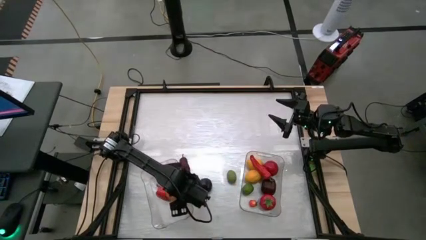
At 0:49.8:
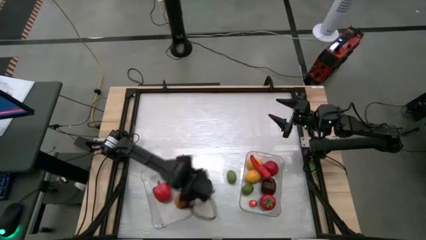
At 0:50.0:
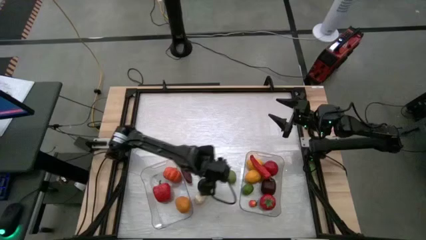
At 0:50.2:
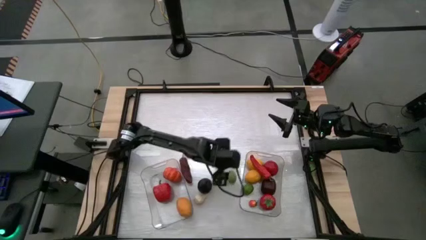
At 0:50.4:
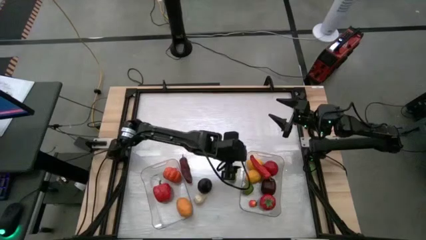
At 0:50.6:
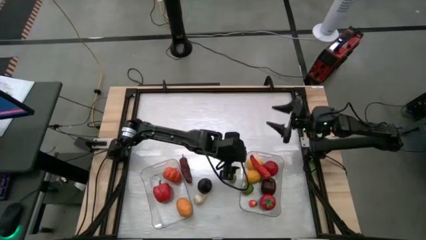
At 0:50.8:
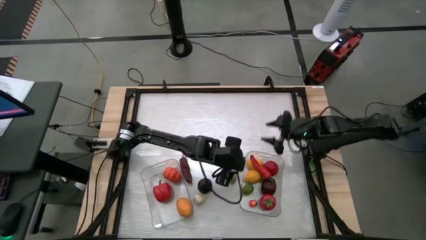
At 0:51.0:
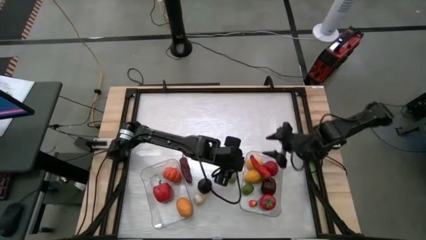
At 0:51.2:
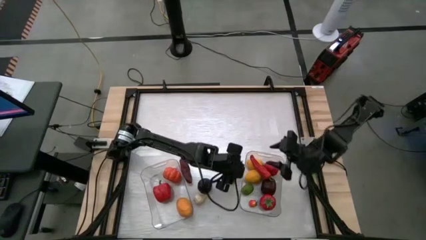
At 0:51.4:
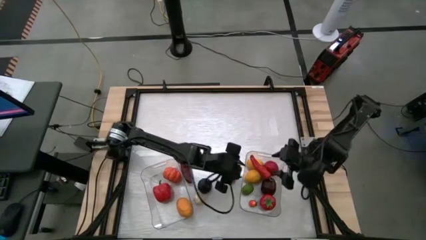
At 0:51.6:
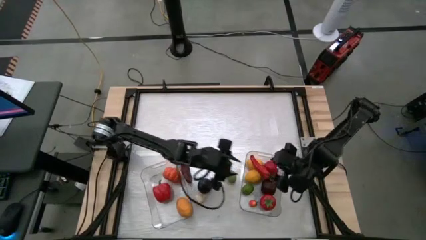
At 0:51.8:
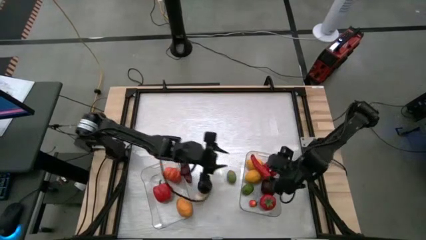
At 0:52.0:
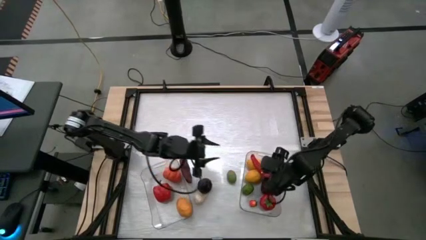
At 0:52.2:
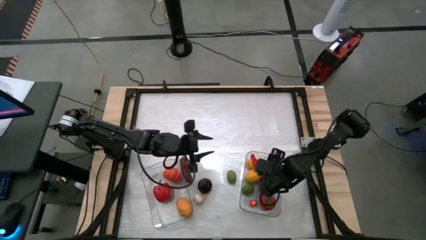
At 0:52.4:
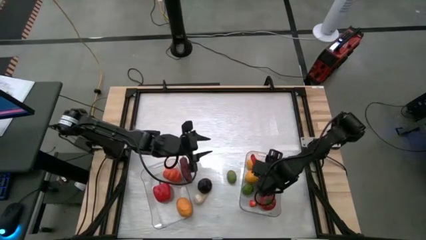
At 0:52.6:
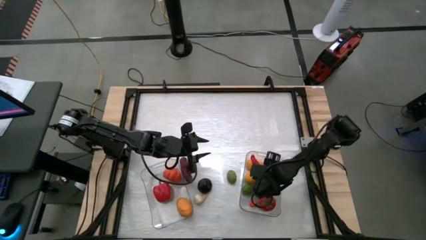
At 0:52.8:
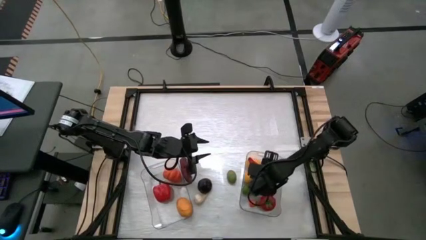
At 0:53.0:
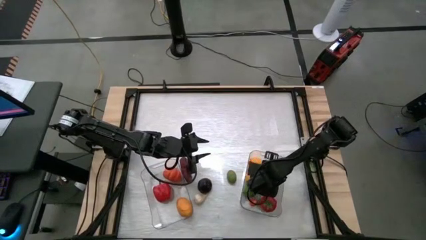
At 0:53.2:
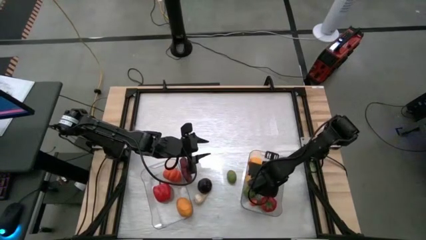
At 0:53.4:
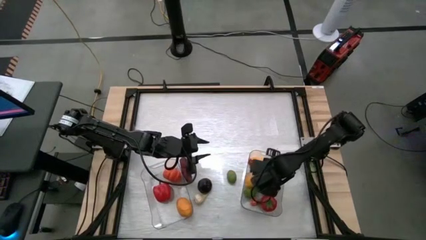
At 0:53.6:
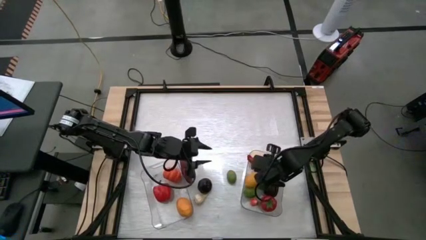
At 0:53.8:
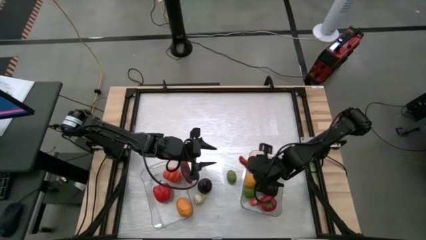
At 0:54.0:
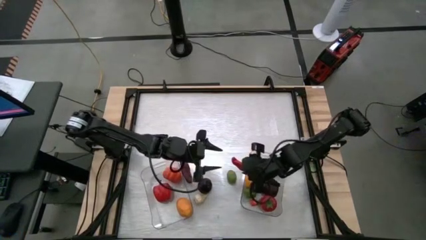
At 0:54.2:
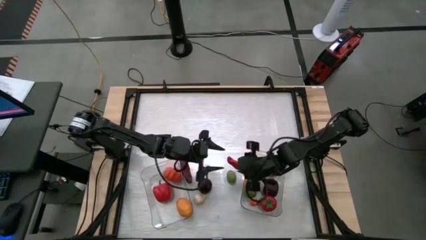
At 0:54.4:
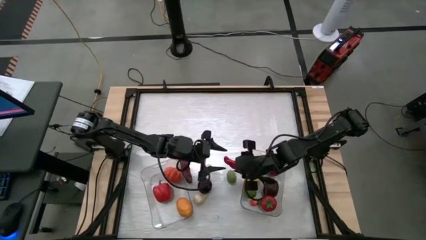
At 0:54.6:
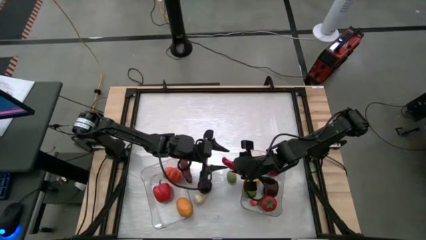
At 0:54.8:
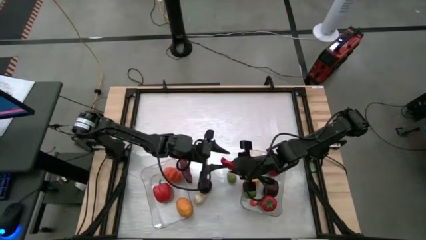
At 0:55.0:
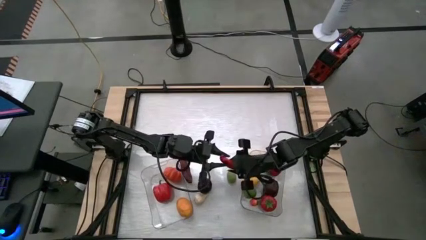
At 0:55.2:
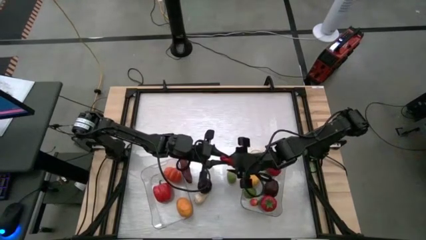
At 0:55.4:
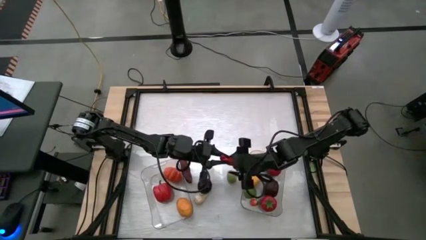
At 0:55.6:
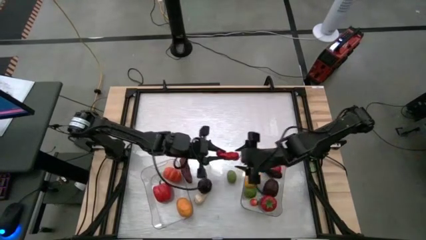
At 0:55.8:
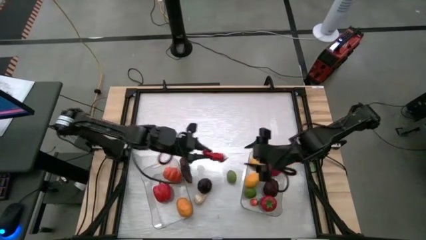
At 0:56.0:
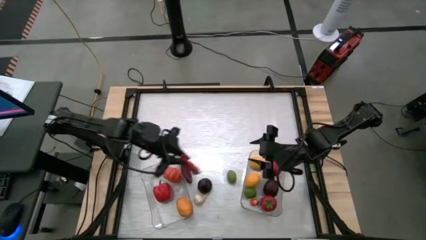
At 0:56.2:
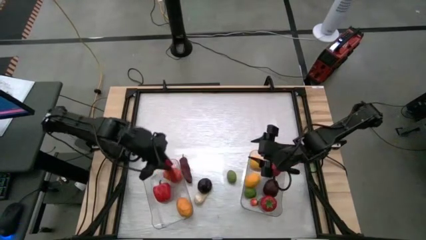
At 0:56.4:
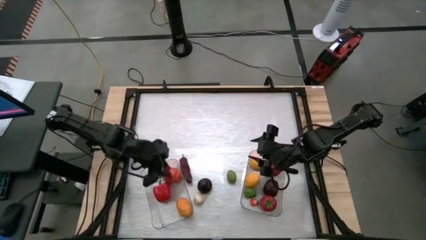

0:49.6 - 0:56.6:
Task: Sort produce into baskets
Put the red chili pepper from the right transparent bin to the left transparent bin

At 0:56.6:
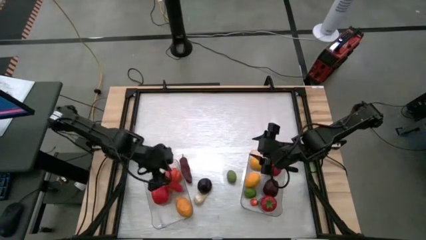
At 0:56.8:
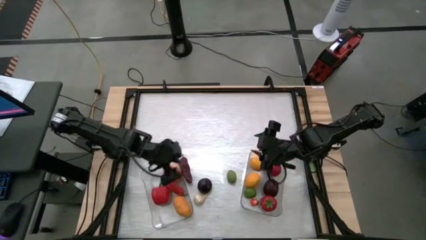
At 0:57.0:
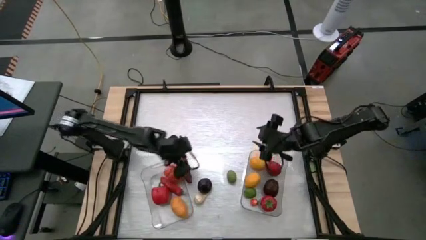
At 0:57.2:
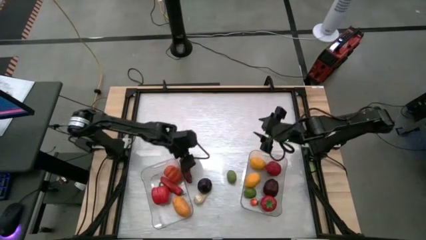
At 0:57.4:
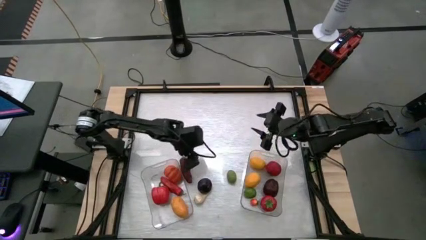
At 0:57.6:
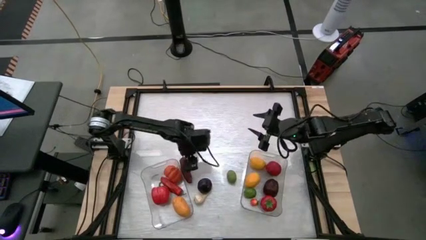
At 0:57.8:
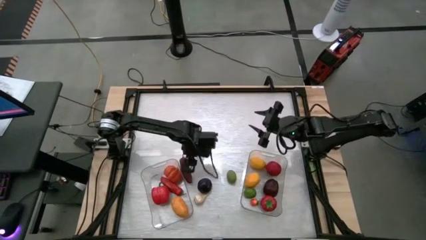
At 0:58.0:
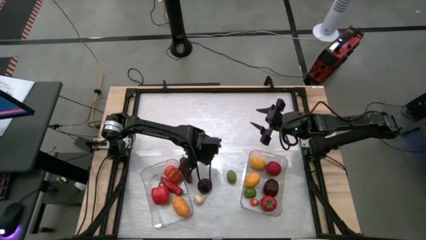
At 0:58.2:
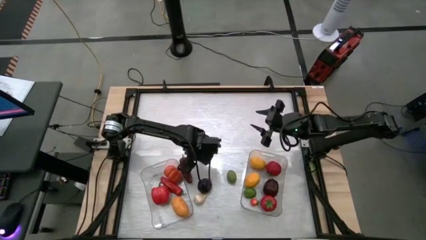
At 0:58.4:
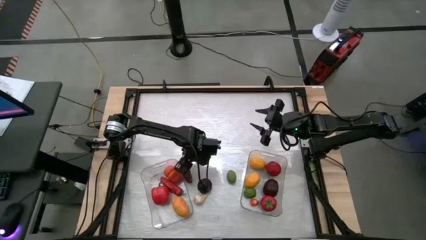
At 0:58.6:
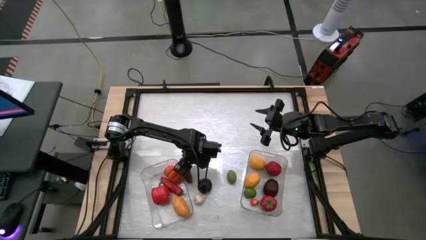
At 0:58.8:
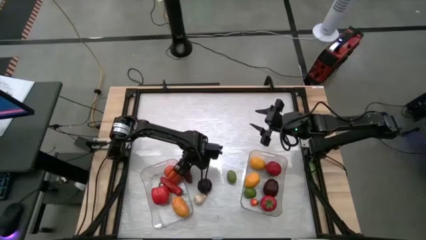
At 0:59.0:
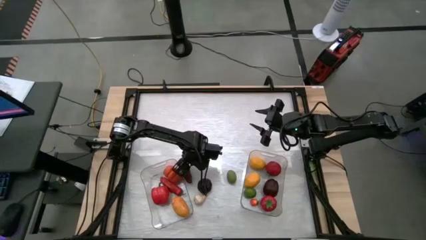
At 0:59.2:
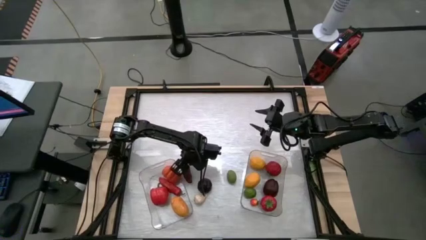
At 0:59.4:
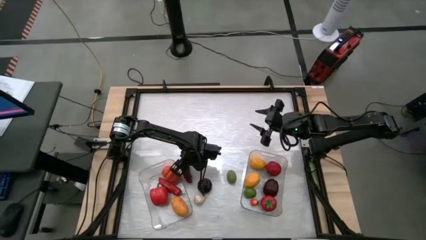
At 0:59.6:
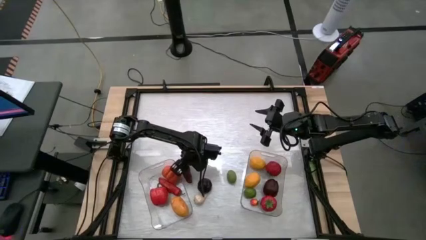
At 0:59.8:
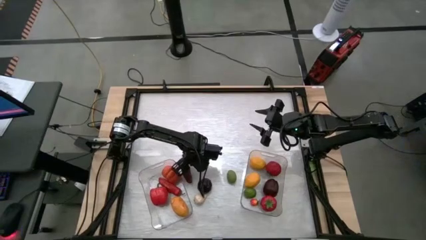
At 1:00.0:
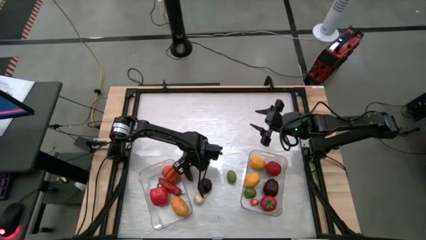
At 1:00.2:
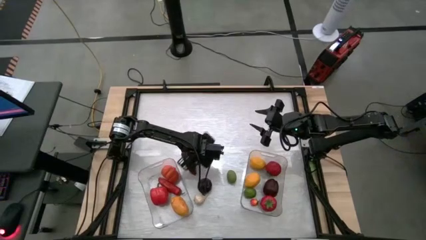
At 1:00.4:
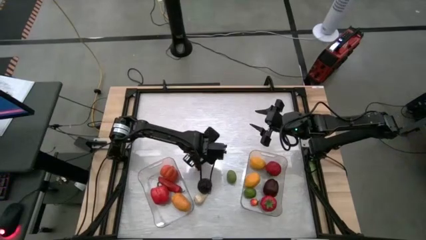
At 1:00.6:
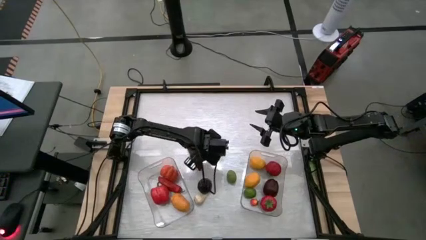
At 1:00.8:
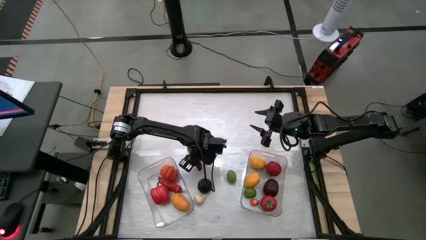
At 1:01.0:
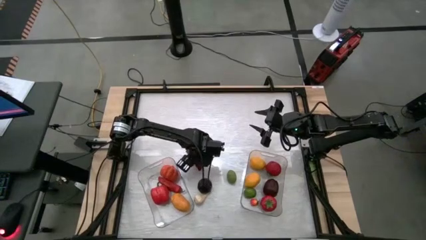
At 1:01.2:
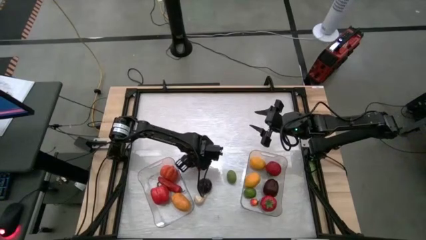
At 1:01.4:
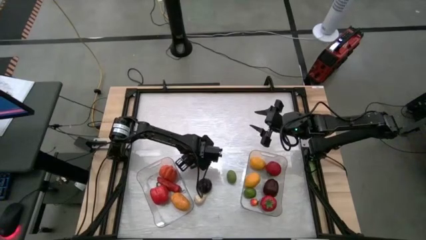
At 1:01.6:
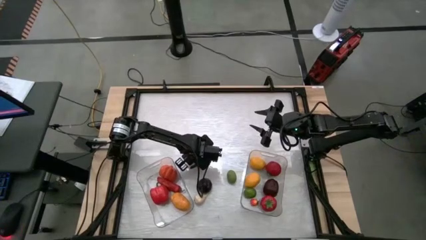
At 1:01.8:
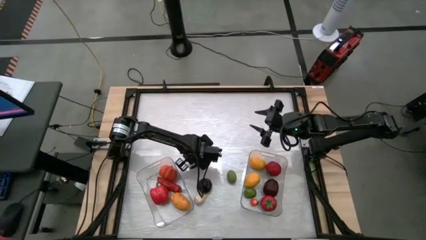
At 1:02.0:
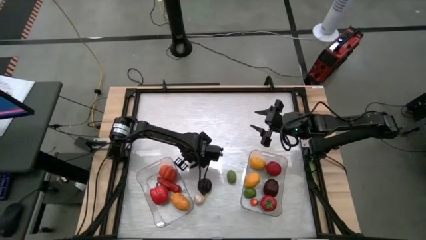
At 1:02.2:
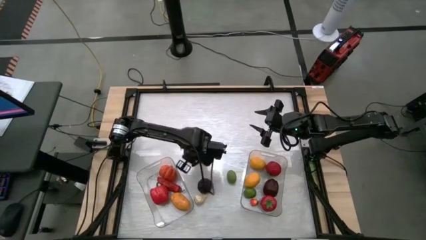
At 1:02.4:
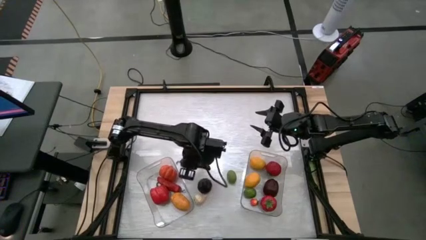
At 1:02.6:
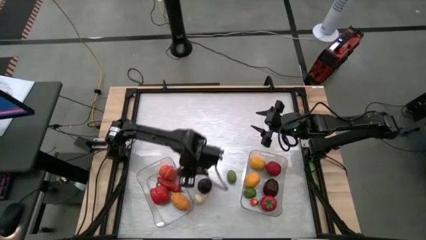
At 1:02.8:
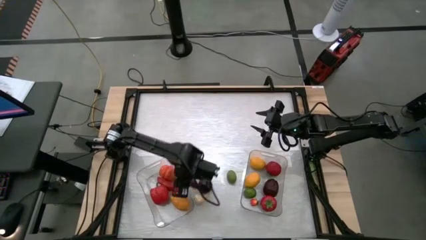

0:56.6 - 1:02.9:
Put the dark red chili pepper into the left transparent bin

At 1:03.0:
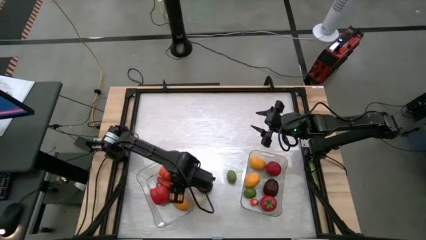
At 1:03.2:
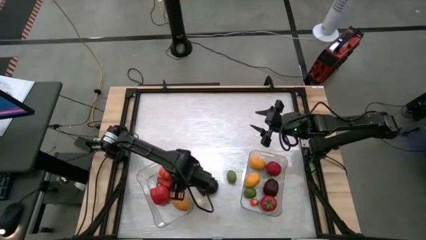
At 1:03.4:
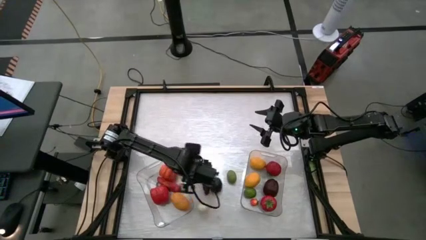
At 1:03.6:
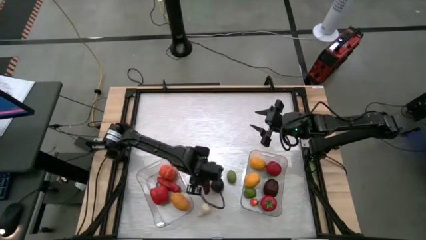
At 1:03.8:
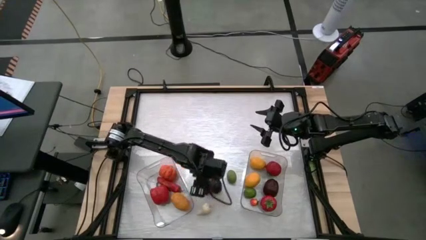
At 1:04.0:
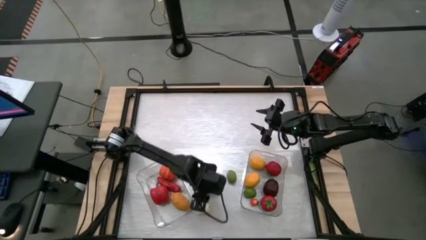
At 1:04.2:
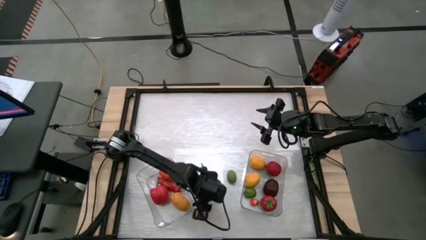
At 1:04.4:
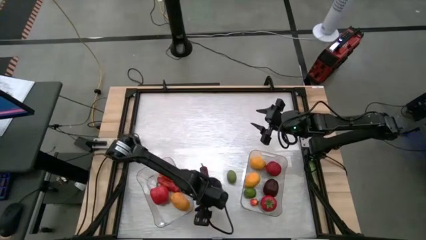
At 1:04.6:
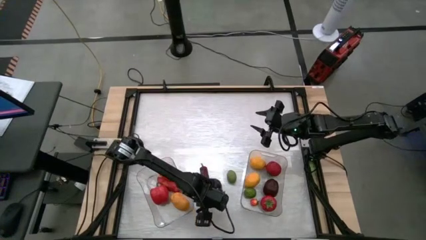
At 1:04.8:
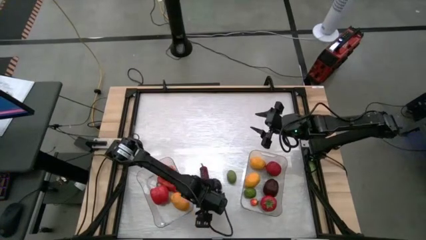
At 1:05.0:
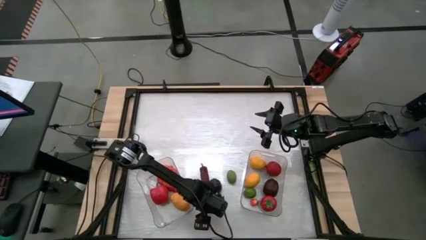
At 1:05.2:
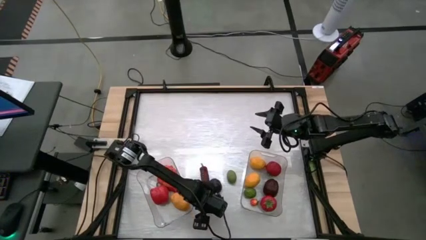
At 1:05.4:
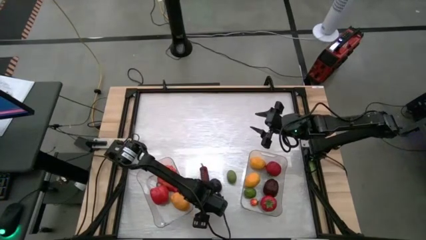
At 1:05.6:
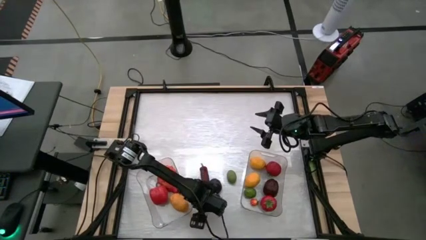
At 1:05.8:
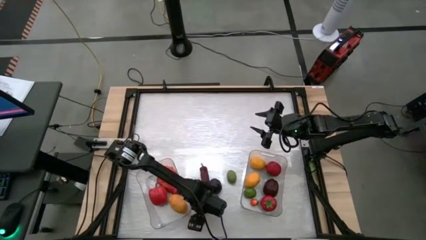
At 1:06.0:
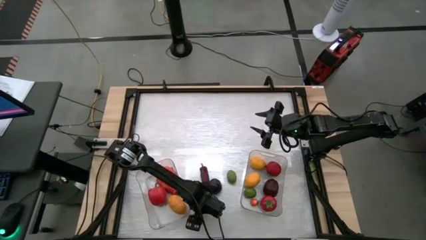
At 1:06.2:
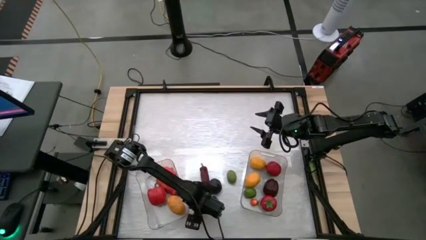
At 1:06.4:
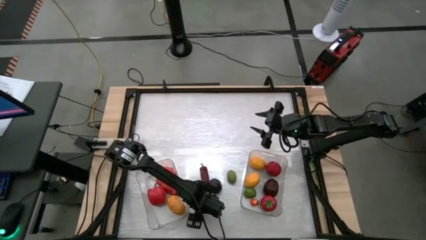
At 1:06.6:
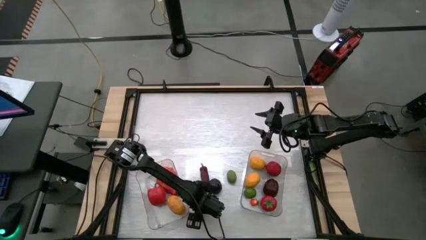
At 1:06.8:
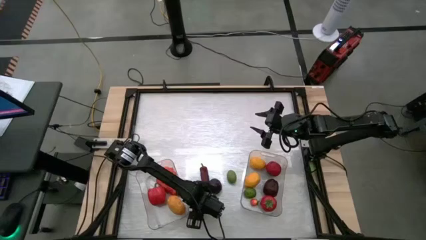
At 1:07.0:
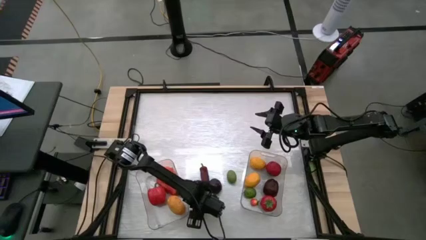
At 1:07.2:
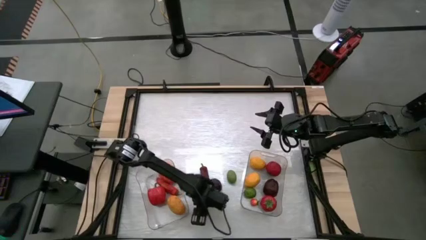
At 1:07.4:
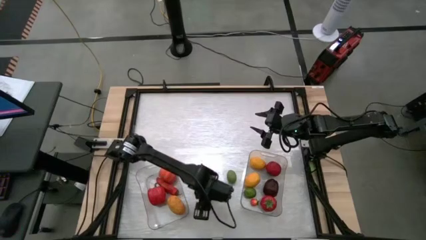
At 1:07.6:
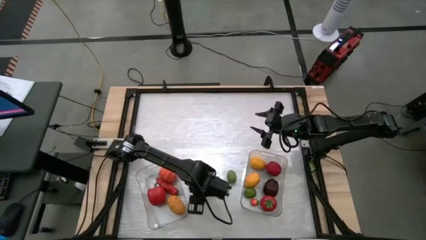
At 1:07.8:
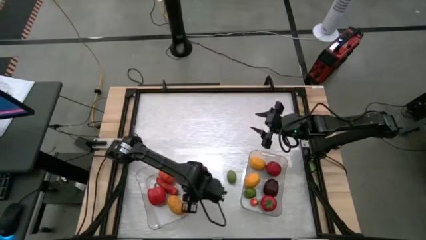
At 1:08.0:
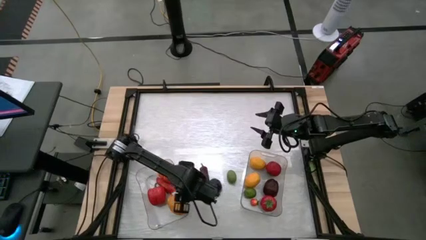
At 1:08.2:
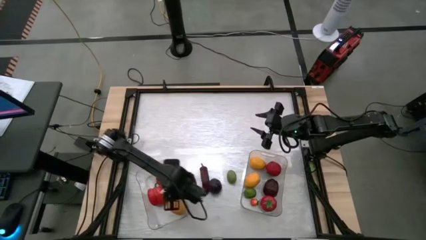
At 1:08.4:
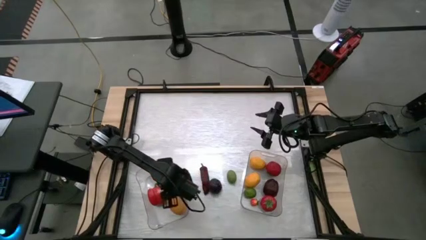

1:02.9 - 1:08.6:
Put the garlic into the left transparent bin
